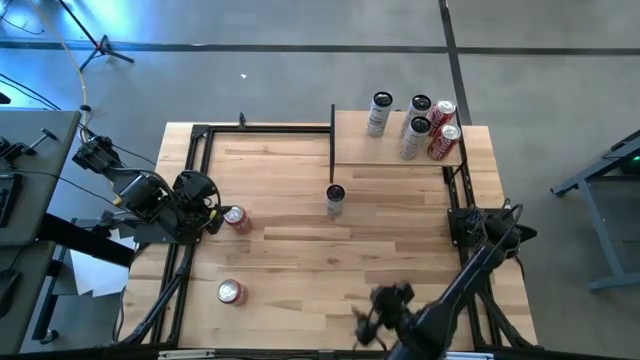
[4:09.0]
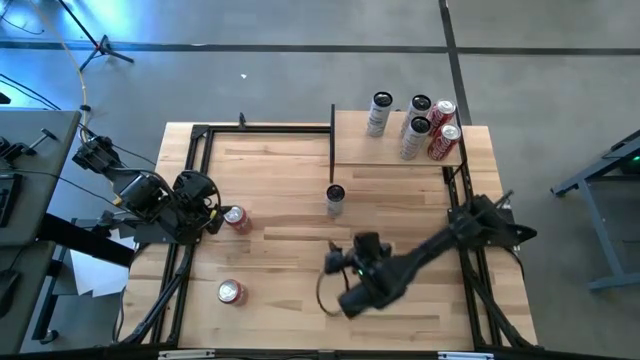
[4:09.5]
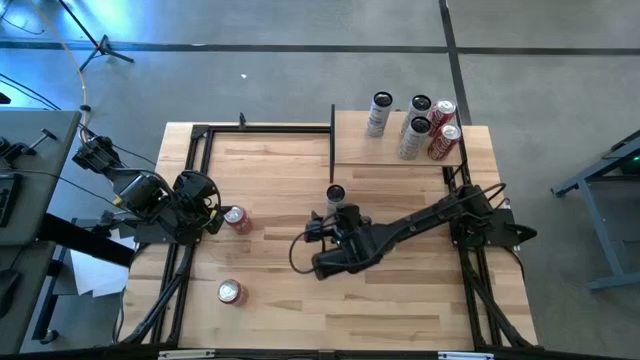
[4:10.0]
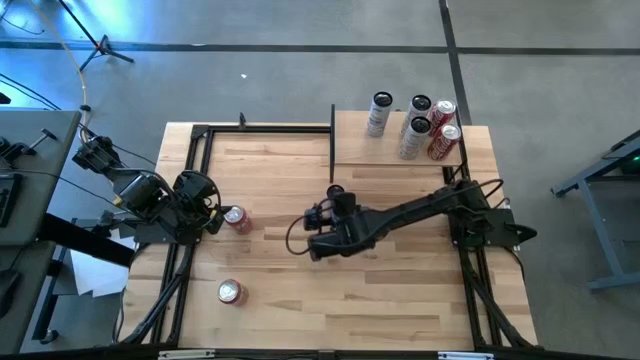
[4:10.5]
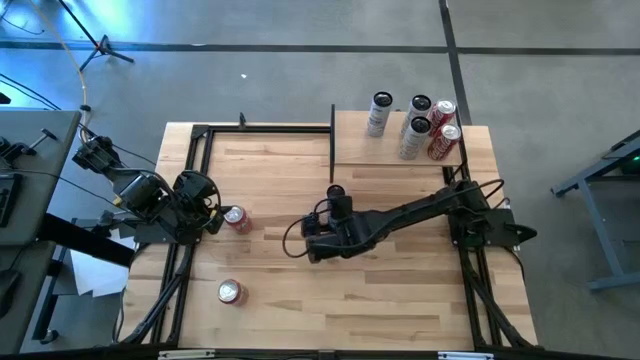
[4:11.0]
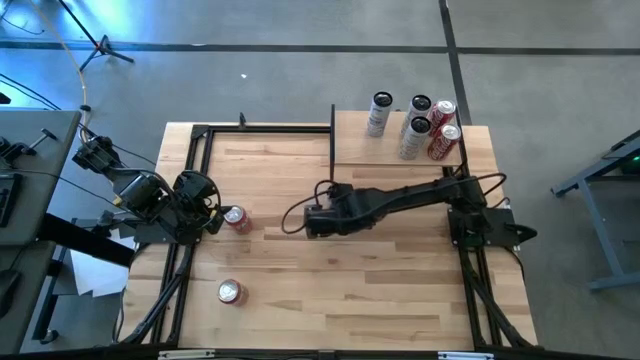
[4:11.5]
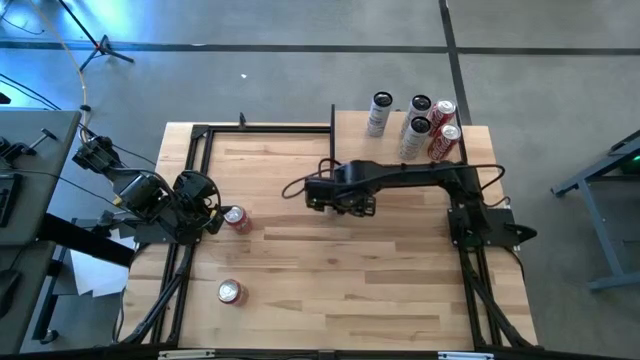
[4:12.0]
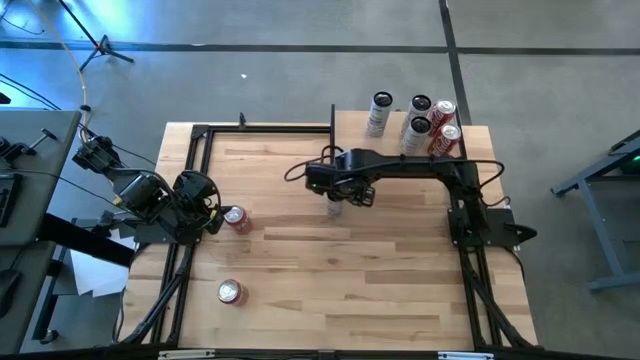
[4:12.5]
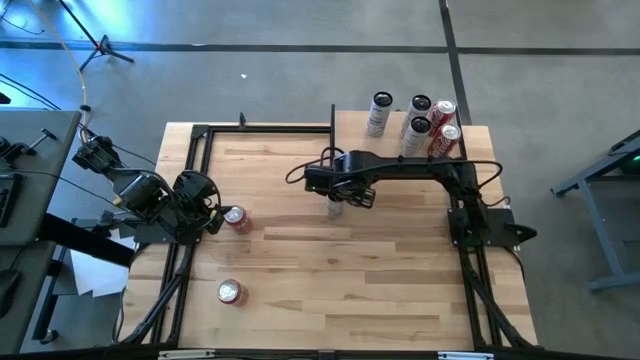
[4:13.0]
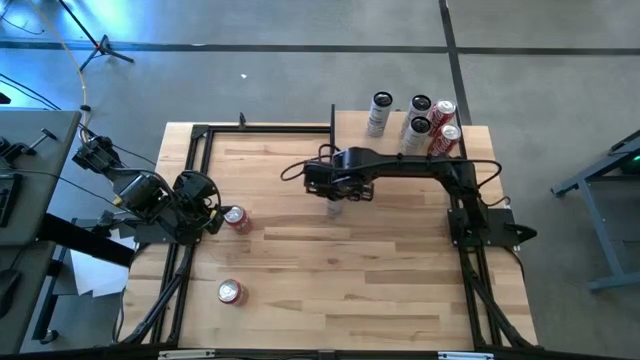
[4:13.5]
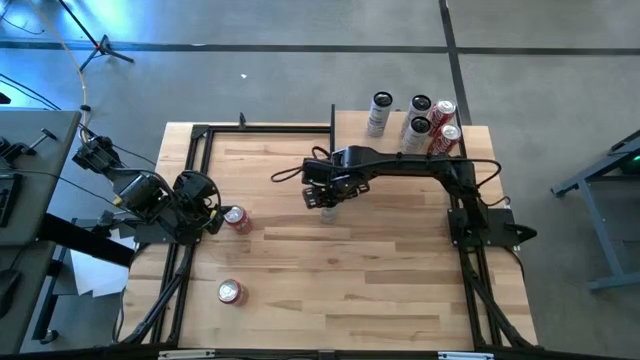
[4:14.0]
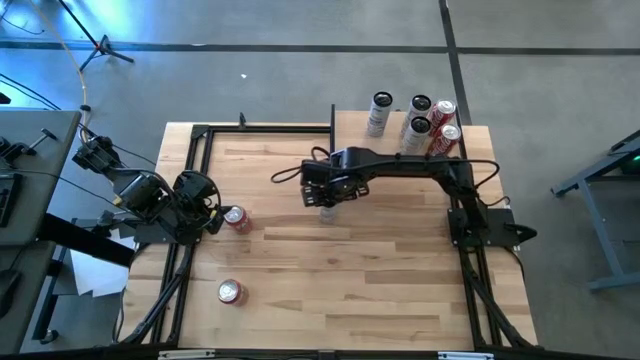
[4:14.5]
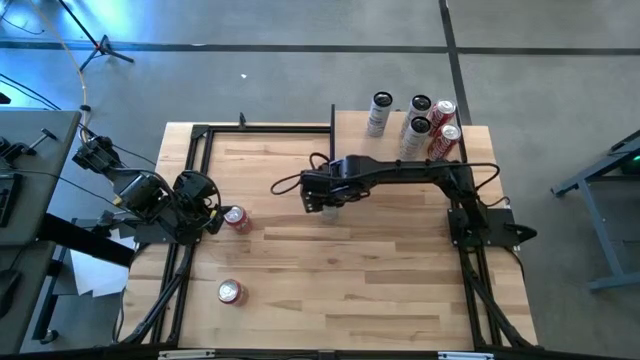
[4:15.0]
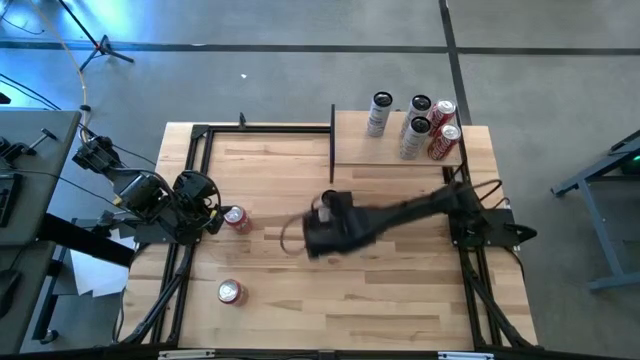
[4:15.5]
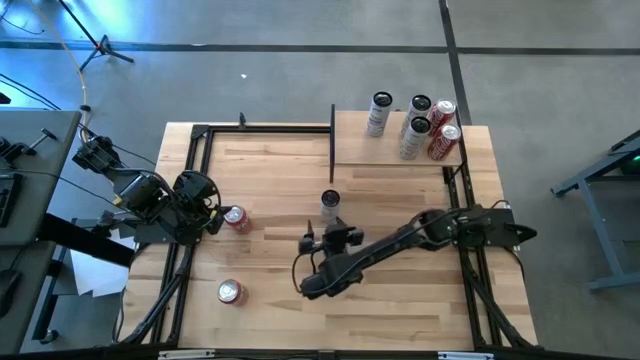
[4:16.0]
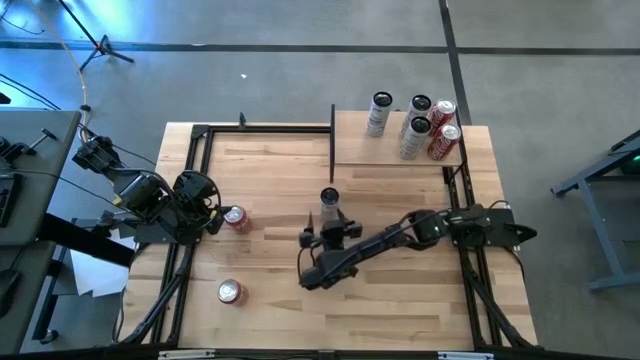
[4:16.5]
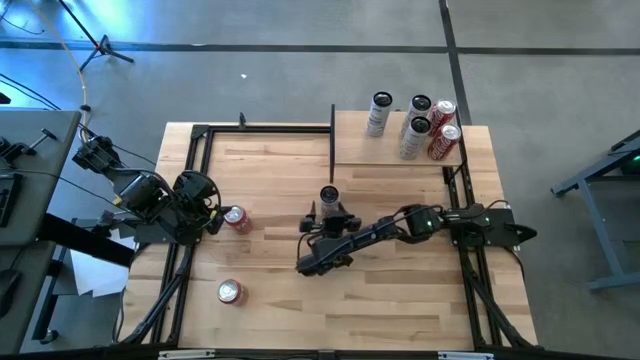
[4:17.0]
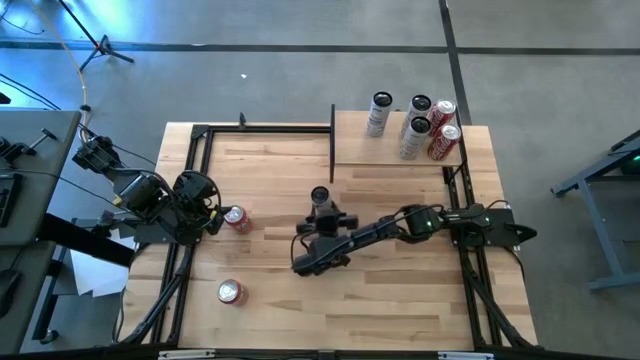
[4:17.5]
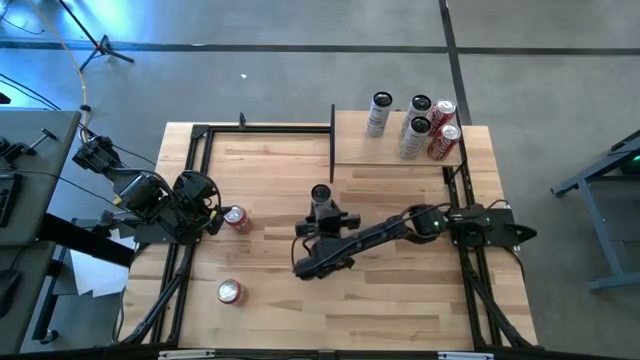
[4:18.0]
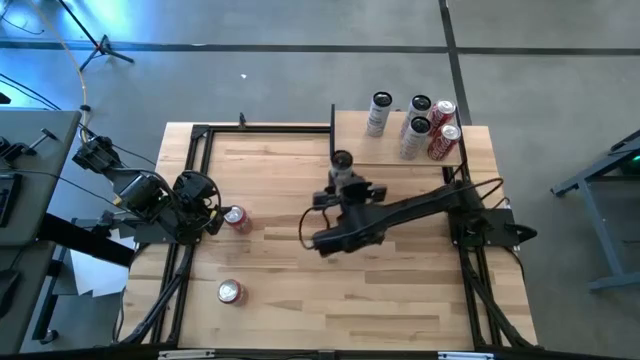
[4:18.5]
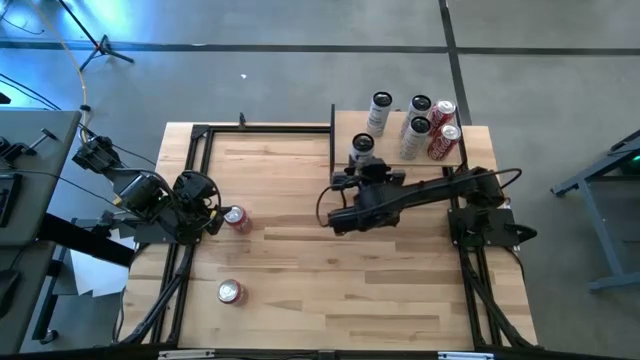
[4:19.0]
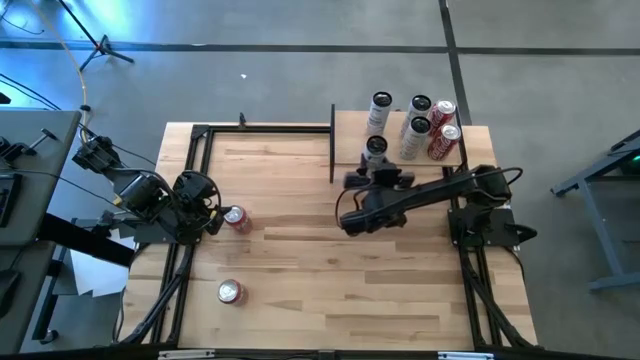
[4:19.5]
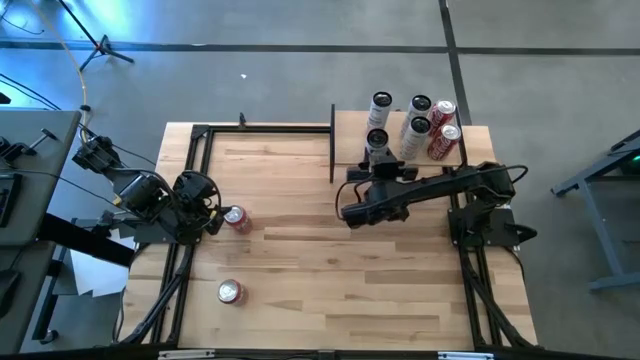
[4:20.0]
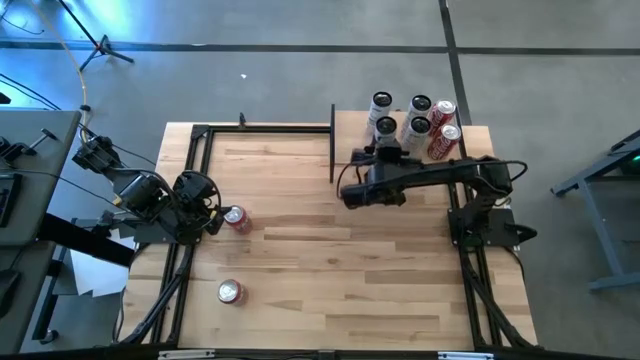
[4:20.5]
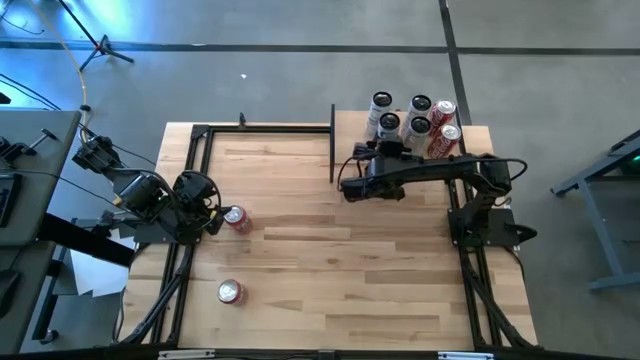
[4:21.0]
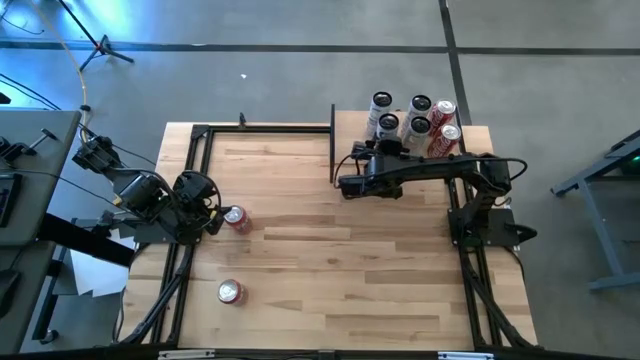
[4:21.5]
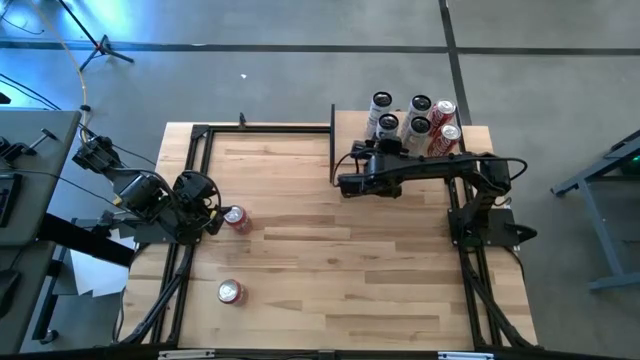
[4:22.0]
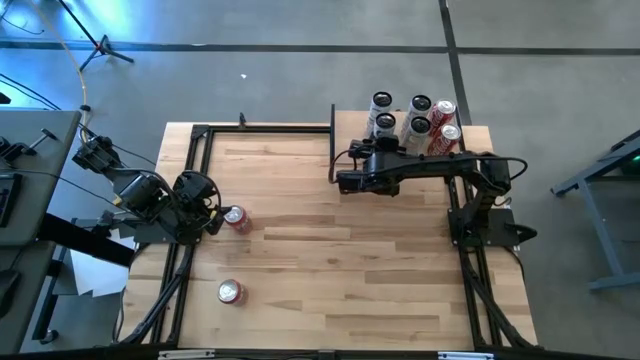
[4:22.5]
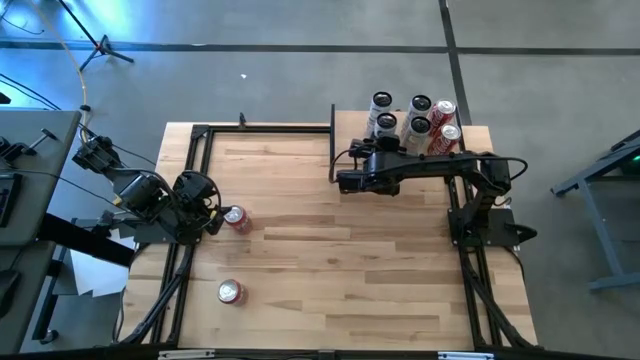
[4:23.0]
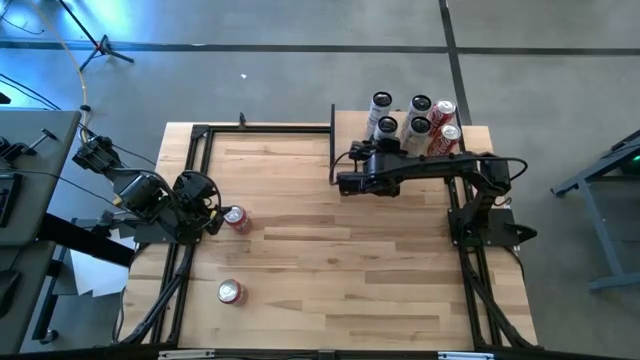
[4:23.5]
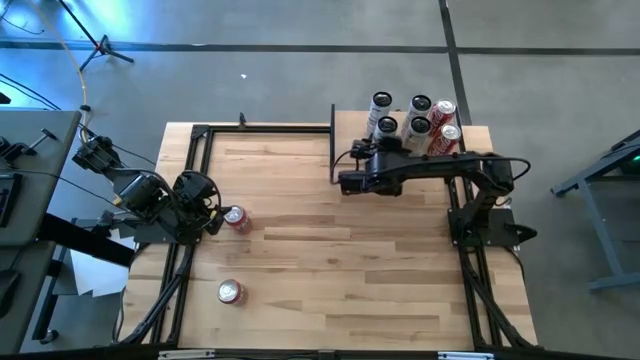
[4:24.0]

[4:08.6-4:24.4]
Task: Place canned beverage on shelf
Put the white soda can on the shelf aligned with the other white soda can

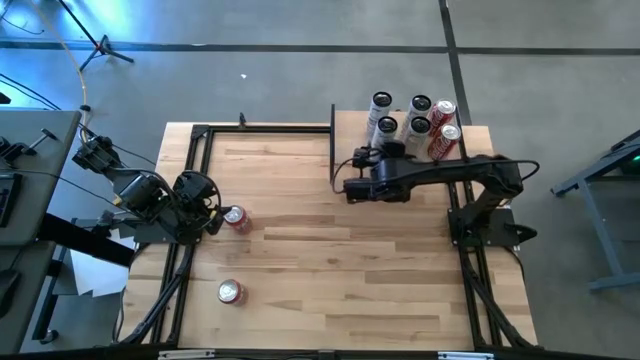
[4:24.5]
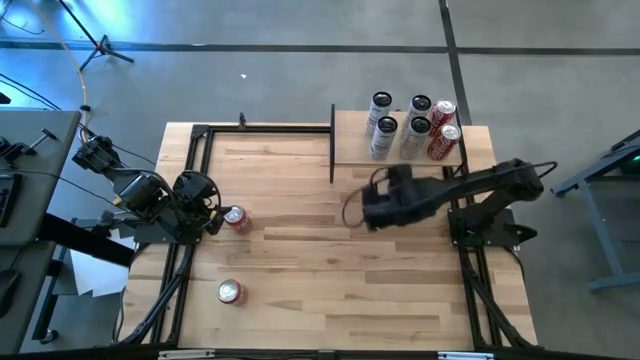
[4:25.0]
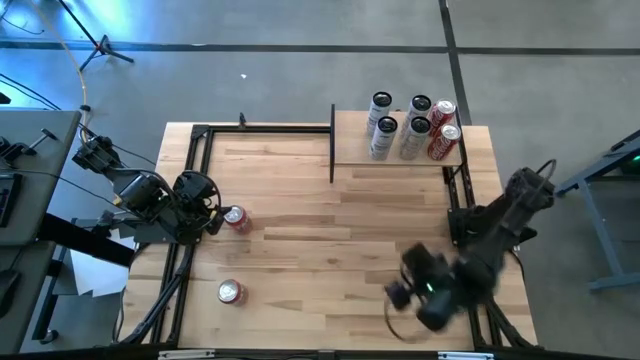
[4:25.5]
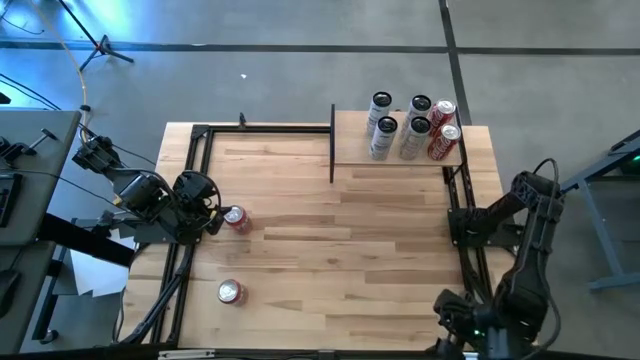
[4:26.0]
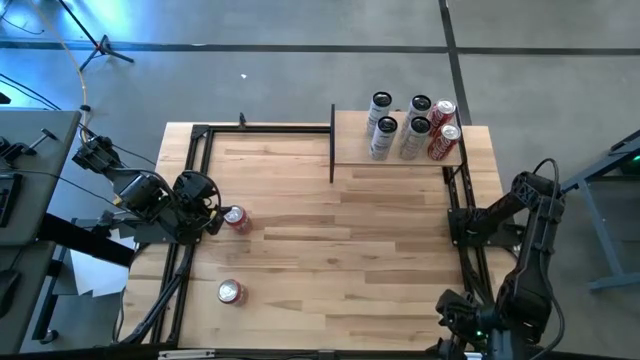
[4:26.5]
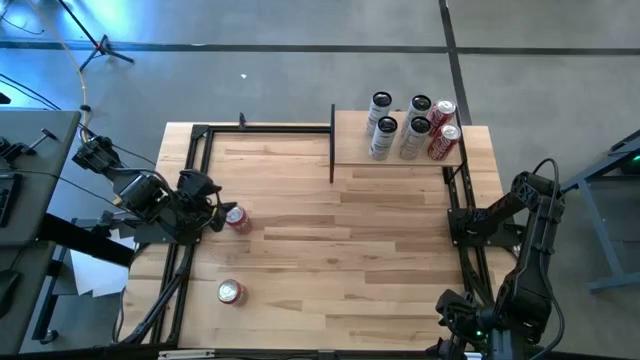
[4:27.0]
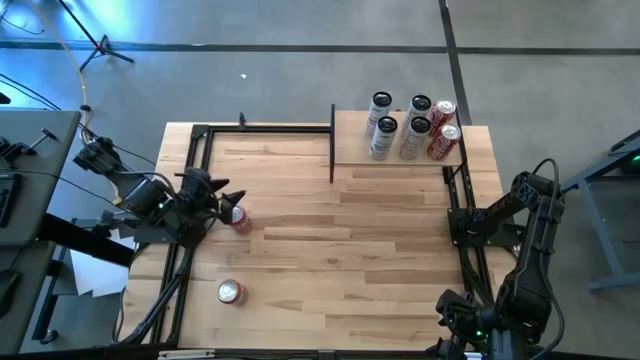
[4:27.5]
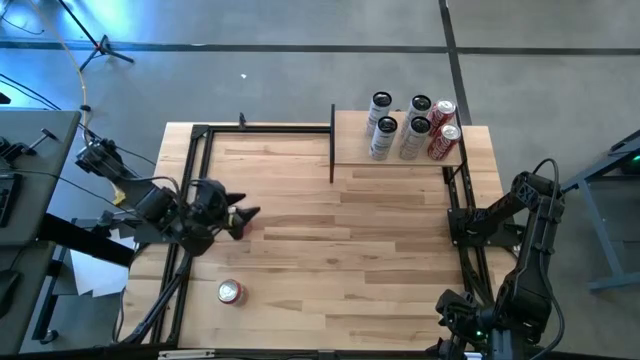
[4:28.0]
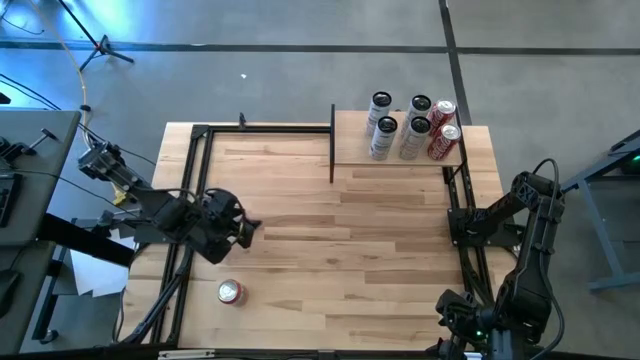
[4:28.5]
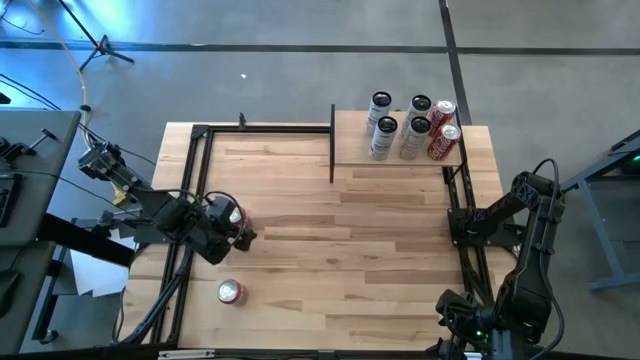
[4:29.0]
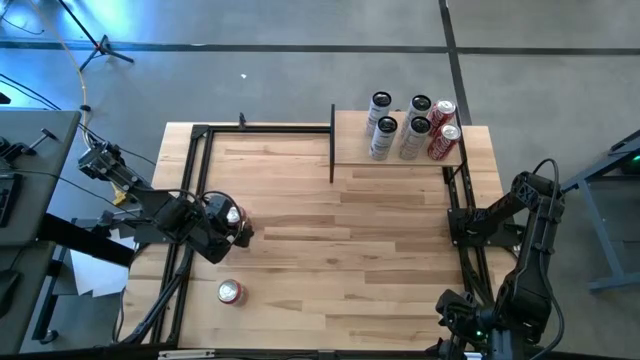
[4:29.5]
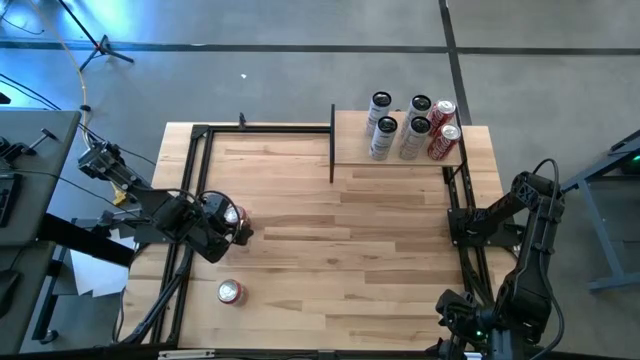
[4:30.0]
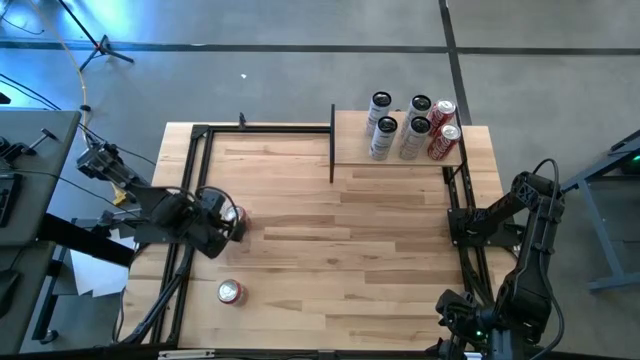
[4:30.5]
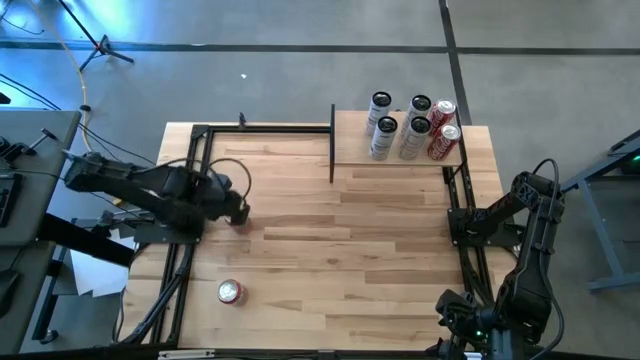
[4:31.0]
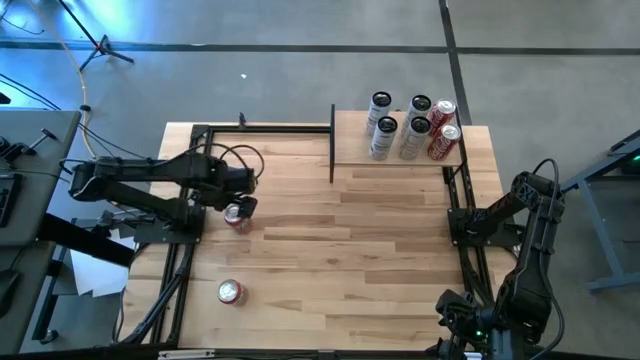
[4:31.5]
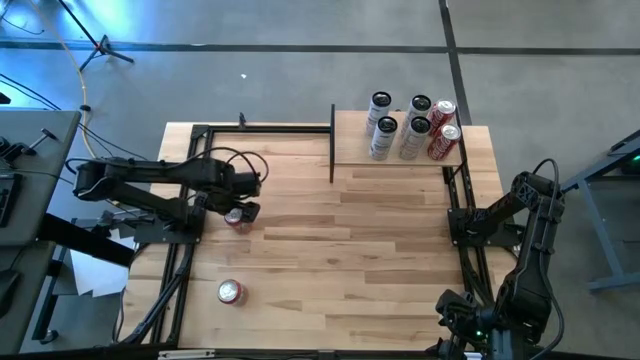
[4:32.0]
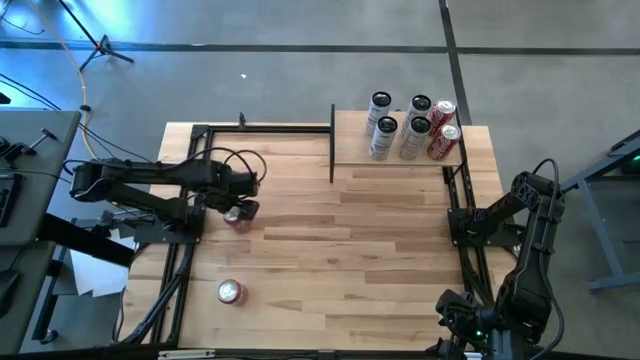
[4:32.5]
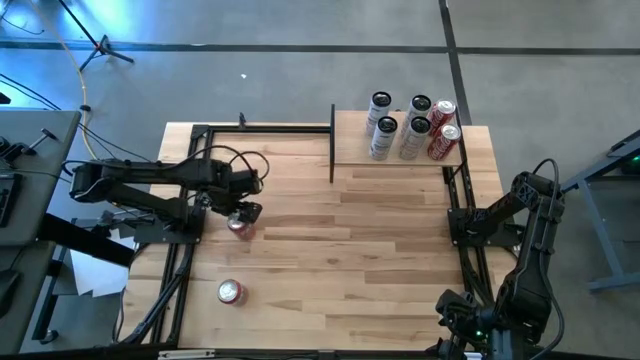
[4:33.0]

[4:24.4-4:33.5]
Put the orange soda can on the shelf
